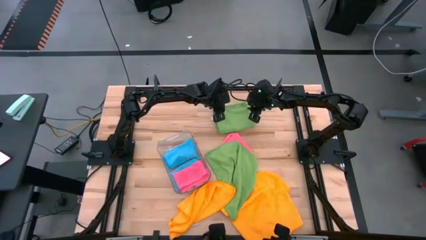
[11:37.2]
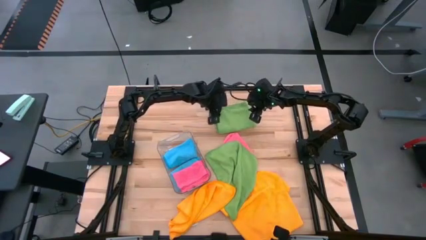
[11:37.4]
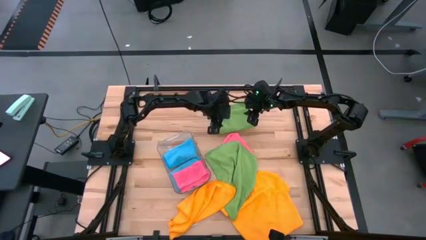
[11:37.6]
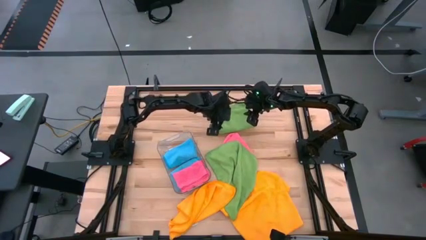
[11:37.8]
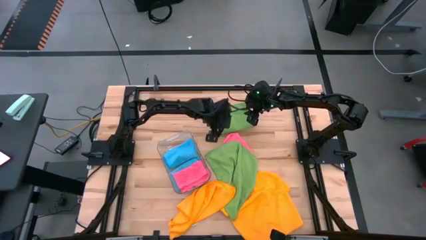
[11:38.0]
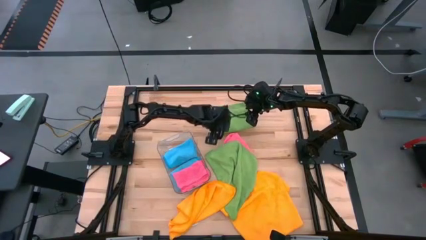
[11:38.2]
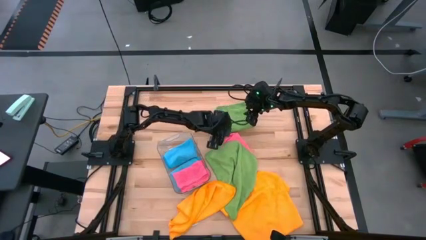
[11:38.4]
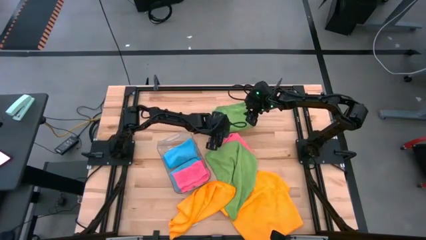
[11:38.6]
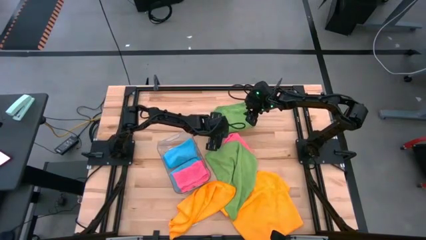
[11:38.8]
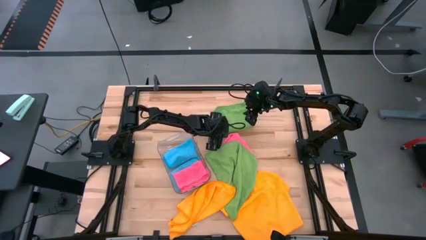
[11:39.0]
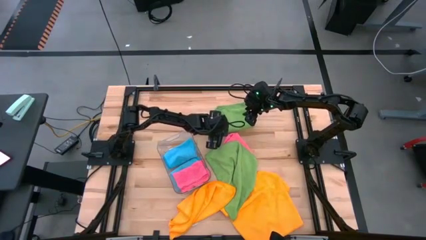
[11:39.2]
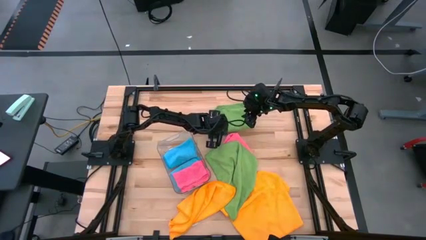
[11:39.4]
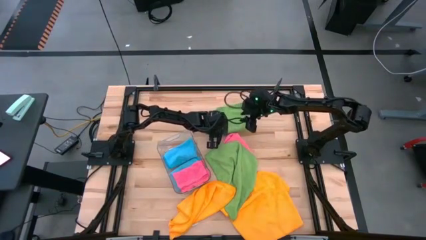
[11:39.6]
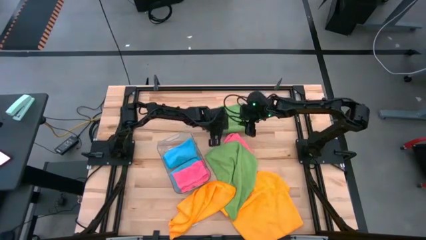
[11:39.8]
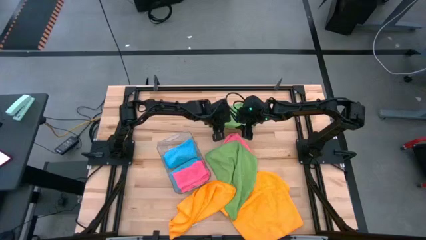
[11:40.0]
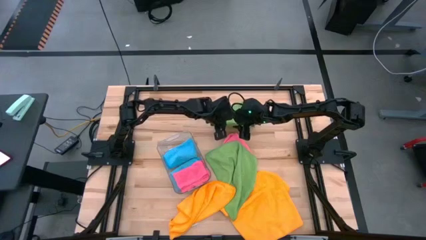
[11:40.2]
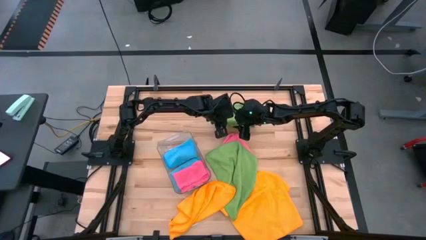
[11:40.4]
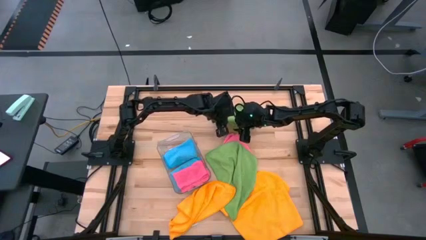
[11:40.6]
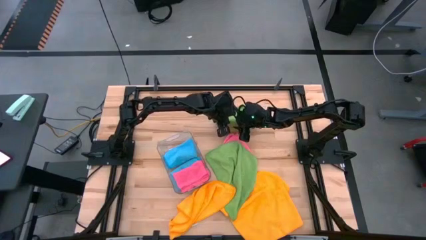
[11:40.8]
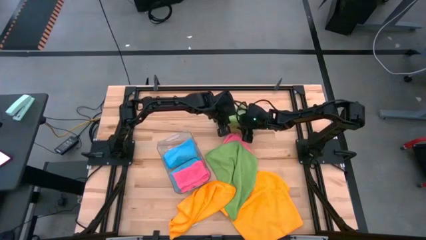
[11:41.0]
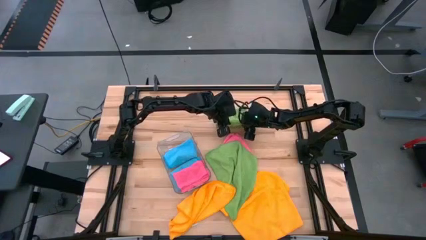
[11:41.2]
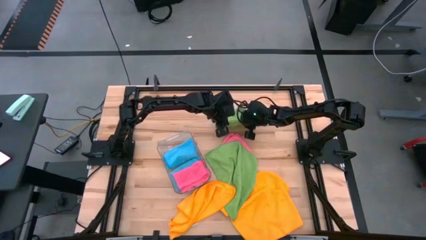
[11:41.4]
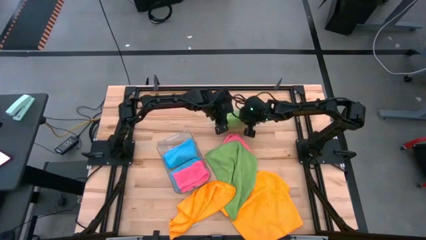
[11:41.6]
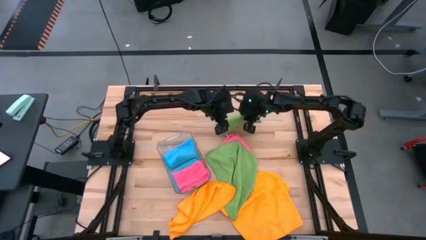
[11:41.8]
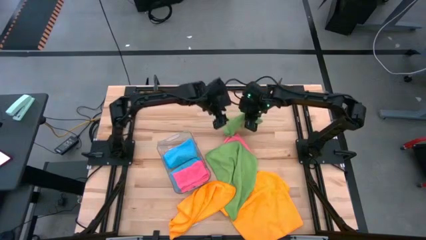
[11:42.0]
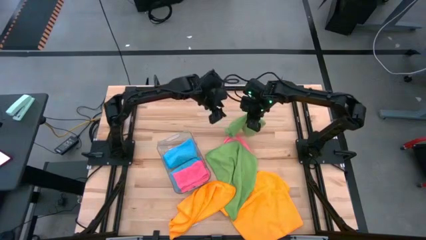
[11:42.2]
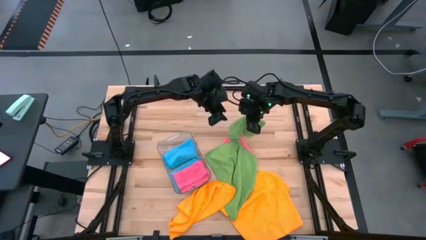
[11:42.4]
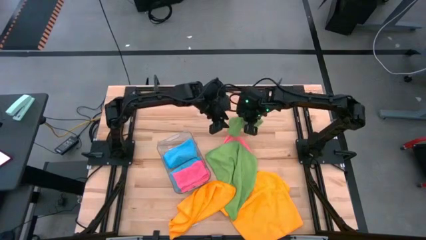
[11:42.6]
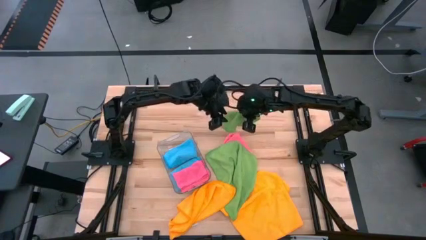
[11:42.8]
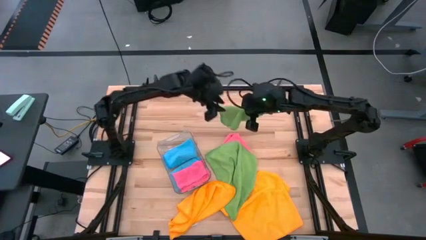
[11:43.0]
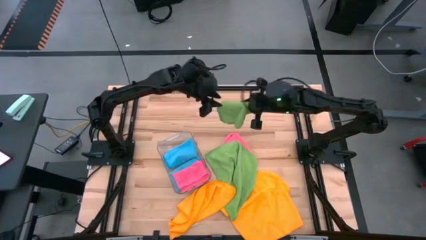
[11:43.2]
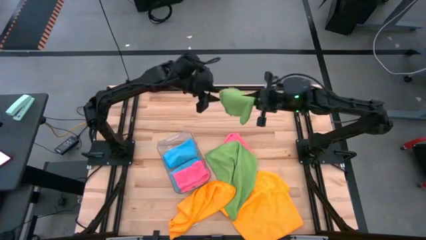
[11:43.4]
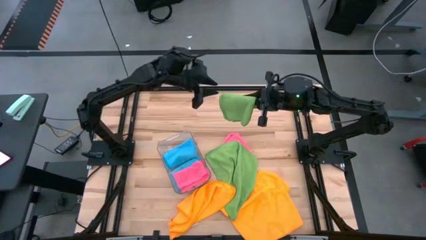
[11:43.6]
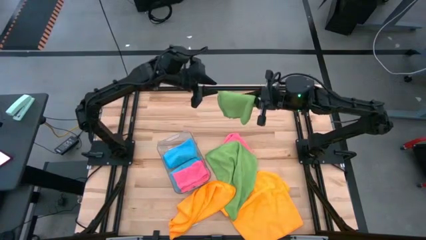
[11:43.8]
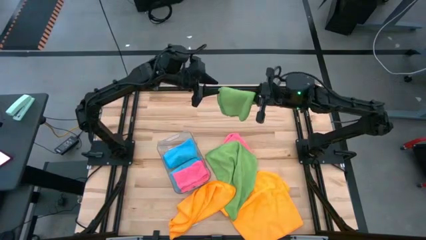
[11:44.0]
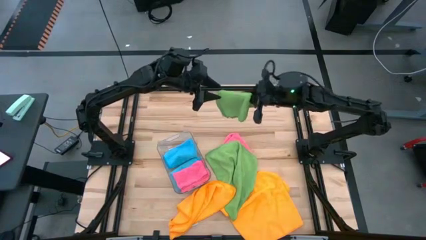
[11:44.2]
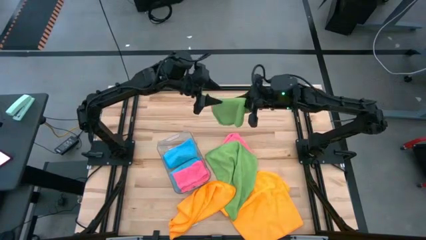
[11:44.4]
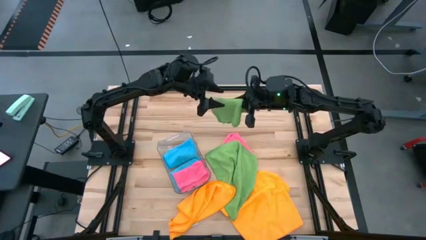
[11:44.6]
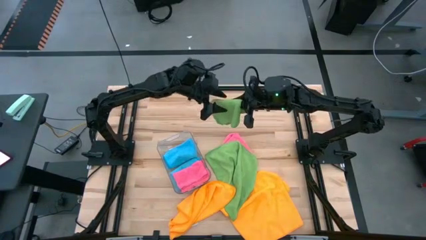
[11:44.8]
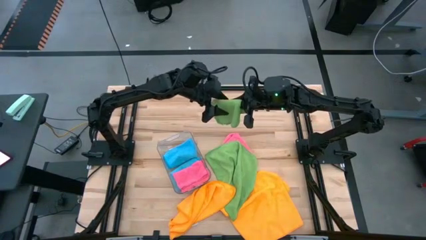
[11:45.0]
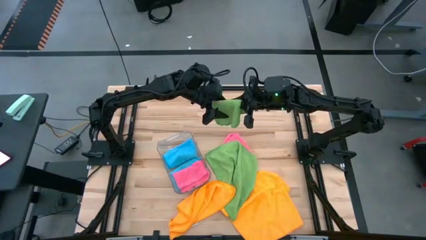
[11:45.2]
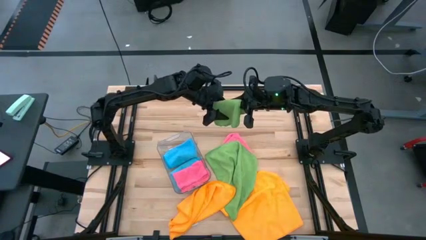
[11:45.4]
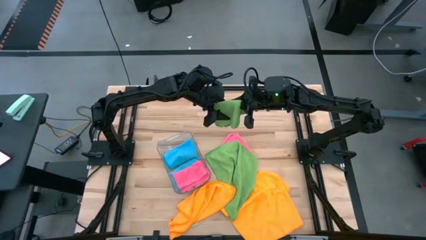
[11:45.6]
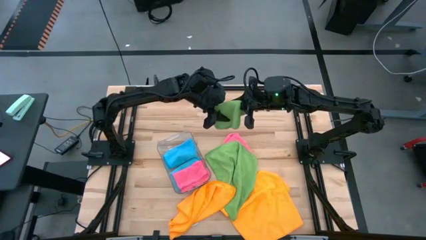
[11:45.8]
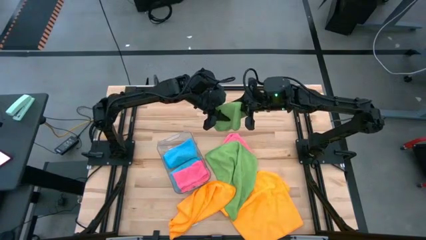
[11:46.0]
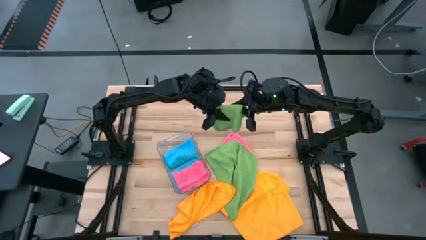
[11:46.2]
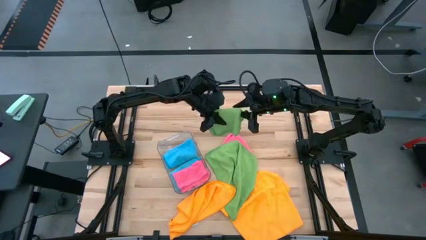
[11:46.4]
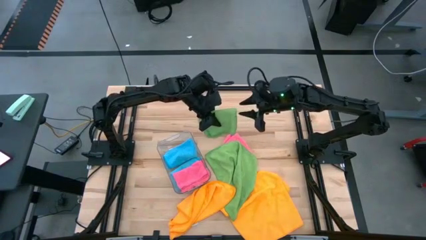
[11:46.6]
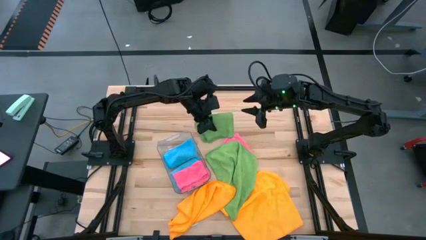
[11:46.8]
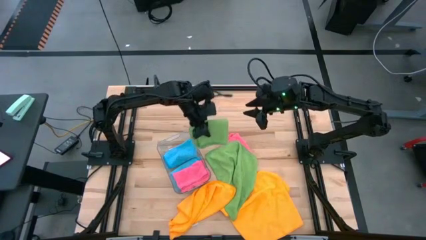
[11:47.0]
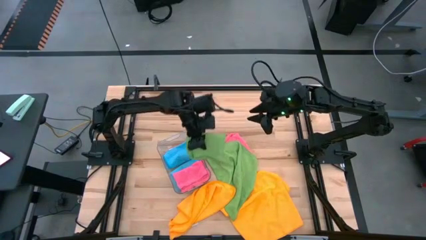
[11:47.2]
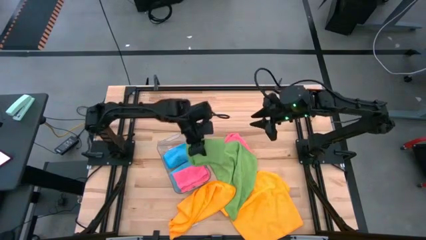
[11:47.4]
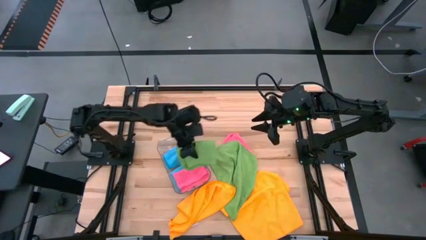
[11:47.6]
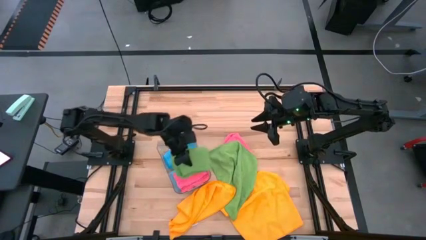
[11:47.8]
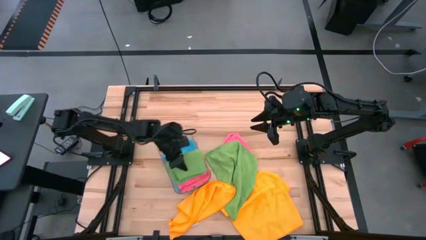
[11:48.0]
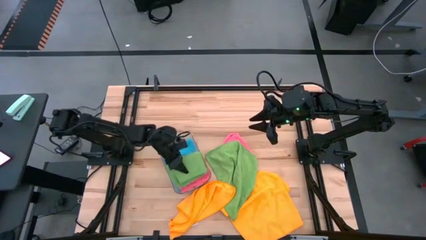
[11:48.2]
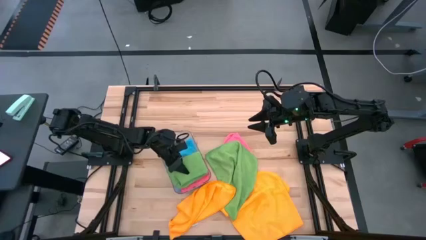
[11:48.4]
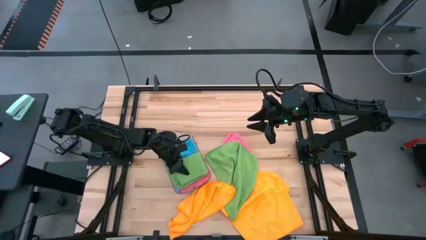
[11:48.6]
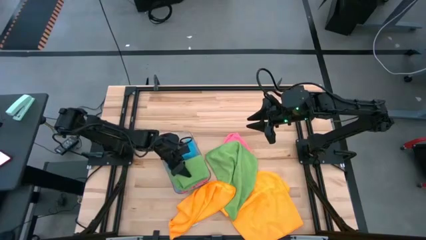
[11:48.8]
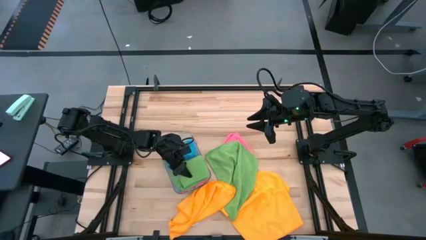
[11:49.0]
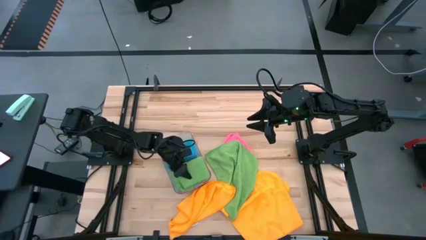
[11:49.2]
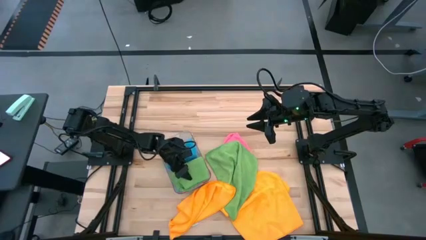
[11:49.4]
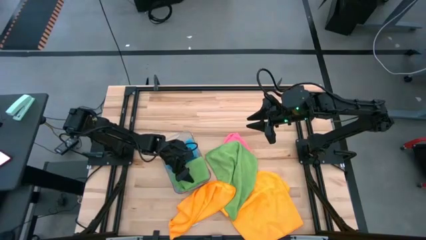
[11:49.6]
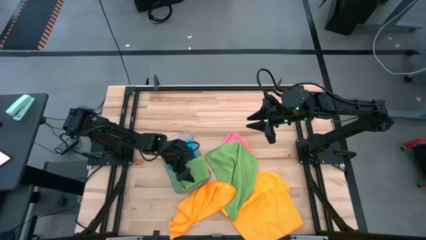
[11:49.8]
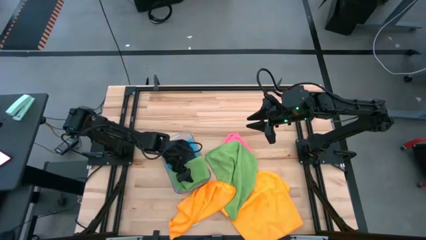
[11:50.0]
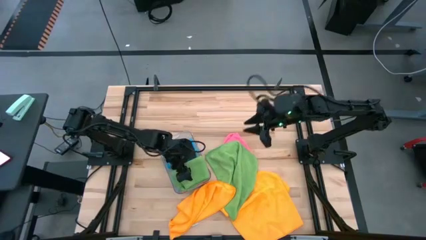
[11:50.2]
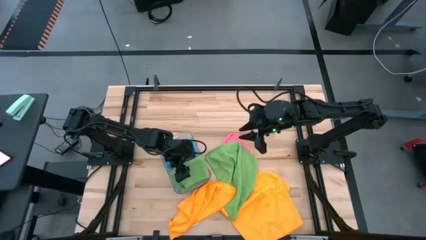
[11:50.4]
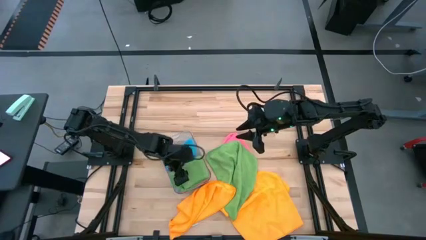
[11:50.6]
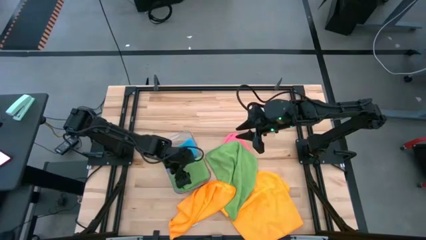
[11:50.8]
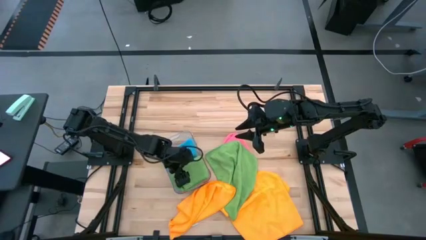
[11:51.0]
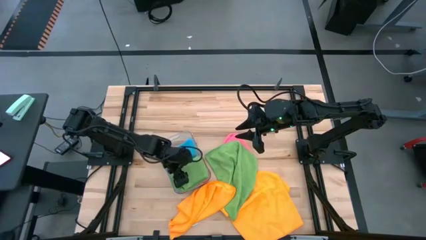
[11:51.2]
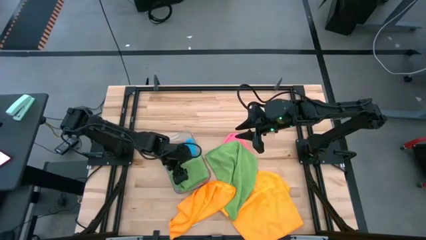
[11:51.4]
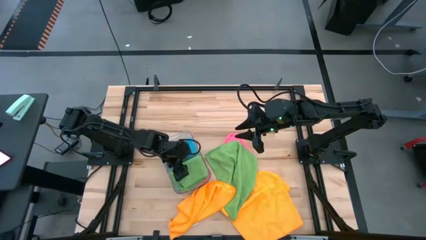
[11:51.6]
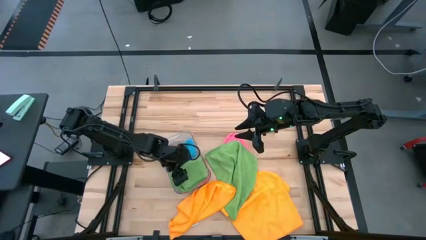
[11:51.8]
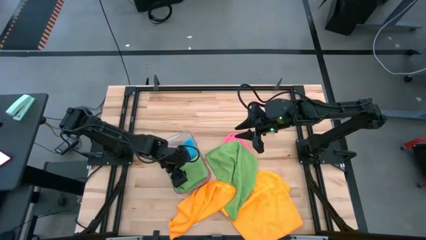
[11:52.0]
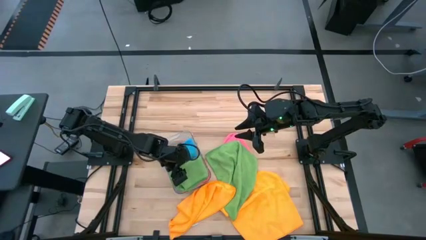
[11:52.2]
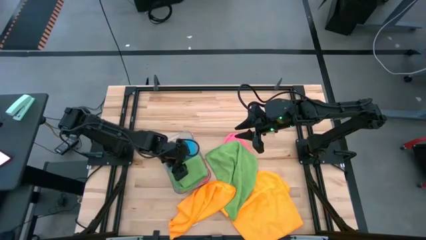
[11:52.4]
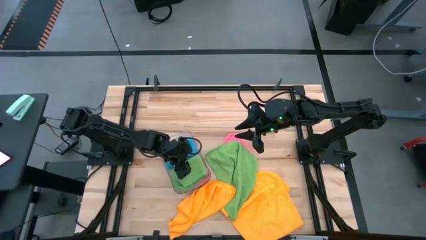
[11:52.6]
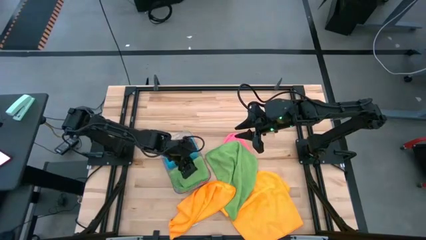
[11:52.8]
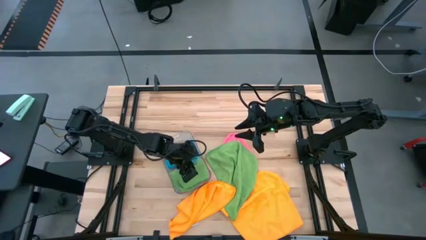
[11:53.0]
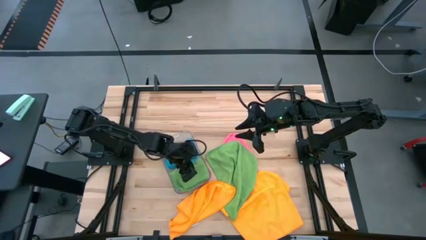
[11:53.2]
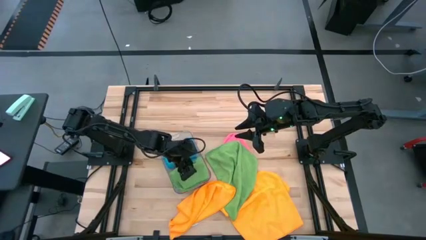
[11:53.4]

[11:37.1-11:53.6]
Task: Fold microfiber towels
Put the top green towel into the transparent bin
